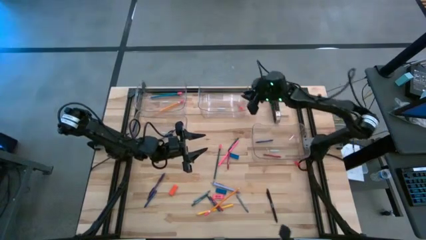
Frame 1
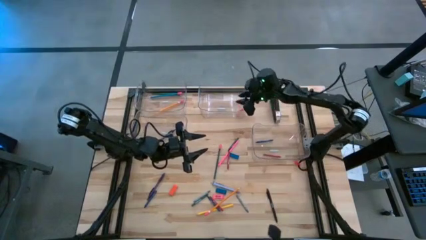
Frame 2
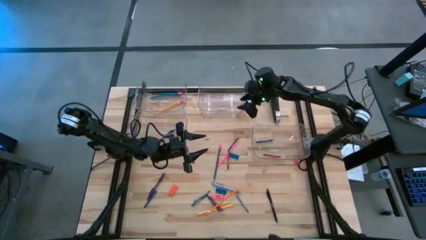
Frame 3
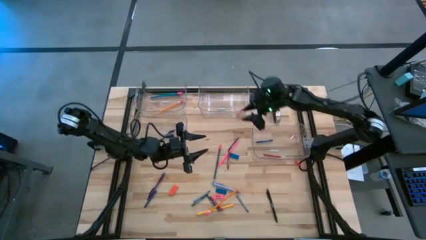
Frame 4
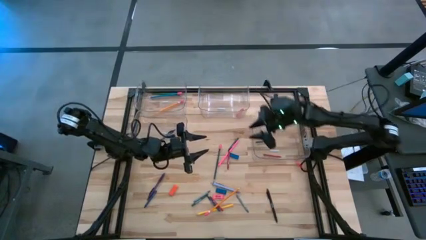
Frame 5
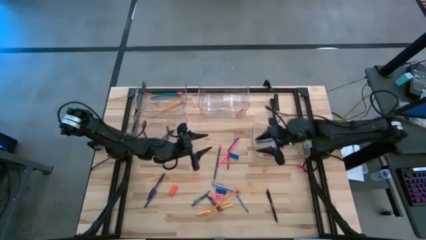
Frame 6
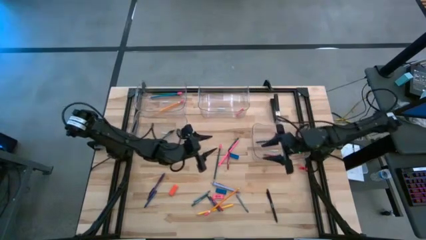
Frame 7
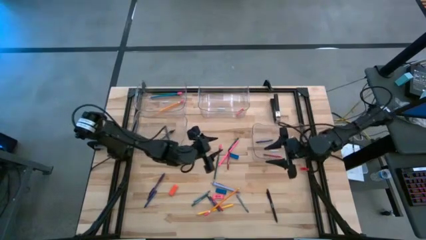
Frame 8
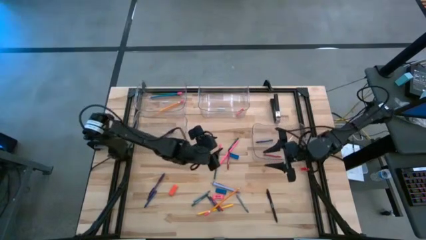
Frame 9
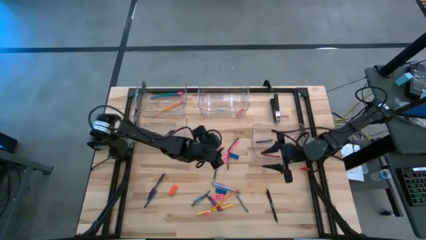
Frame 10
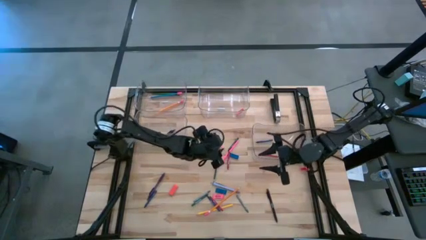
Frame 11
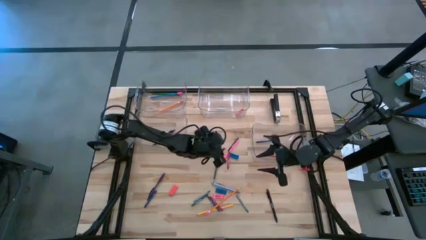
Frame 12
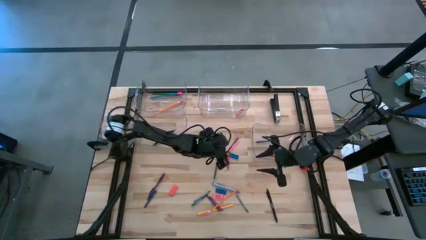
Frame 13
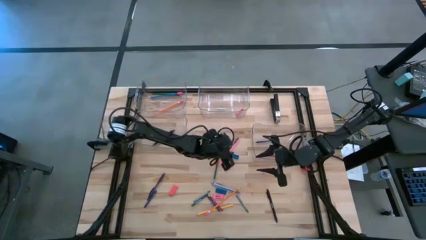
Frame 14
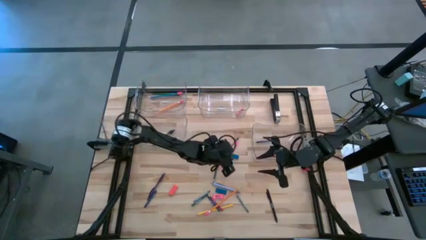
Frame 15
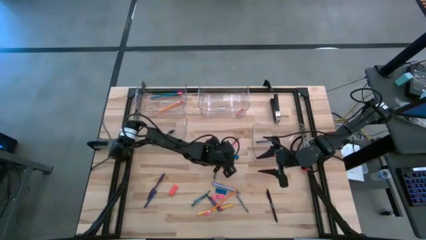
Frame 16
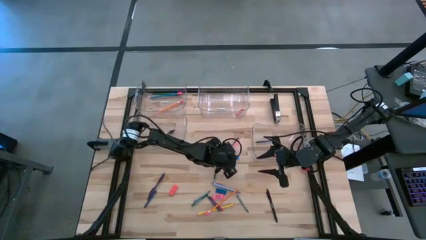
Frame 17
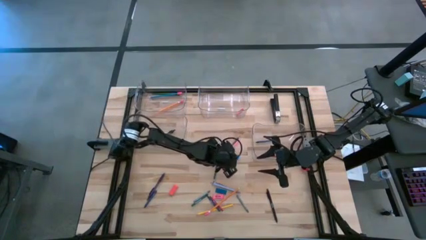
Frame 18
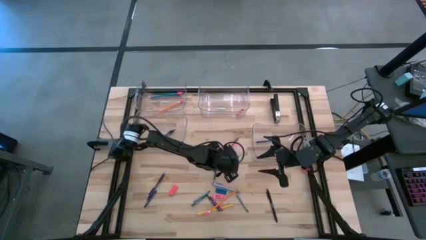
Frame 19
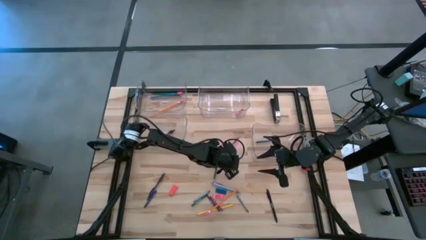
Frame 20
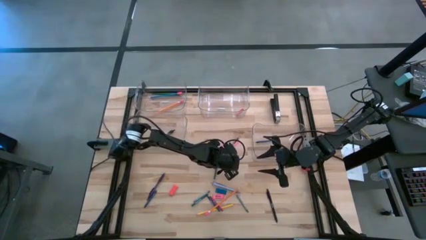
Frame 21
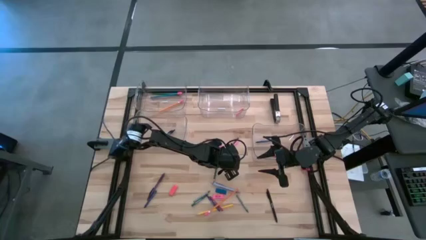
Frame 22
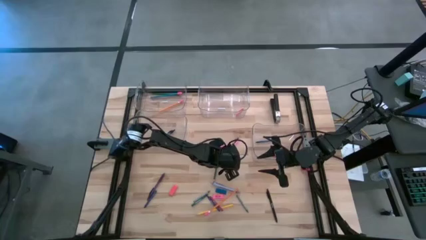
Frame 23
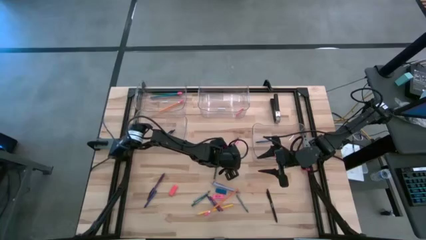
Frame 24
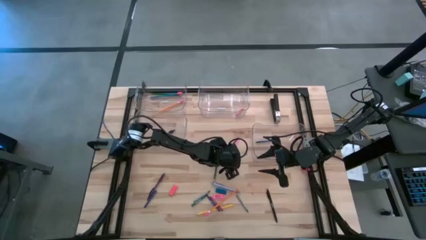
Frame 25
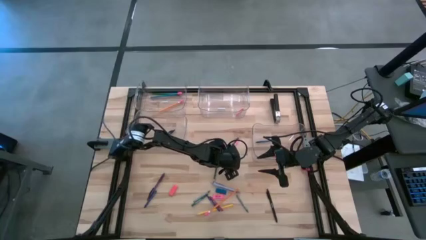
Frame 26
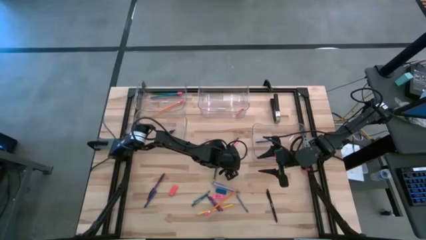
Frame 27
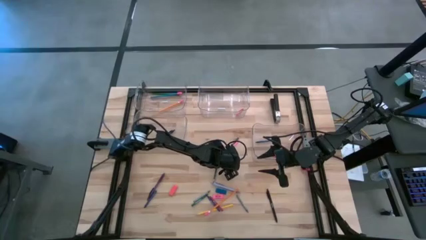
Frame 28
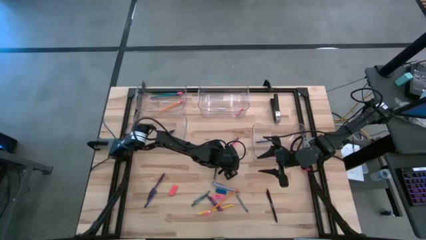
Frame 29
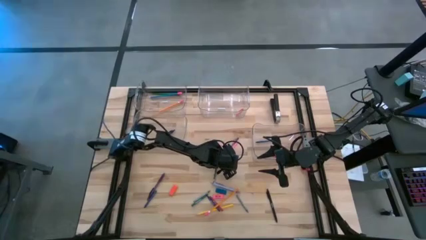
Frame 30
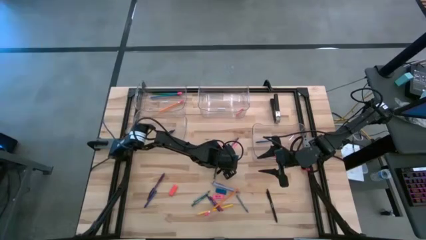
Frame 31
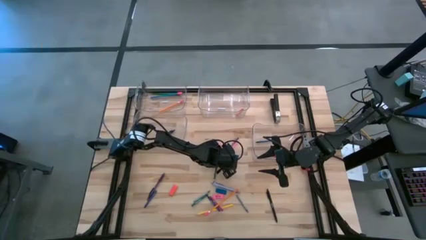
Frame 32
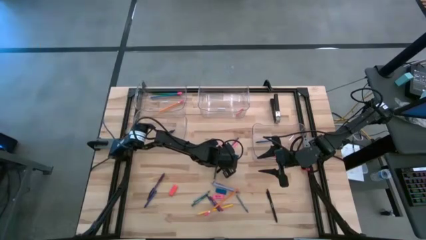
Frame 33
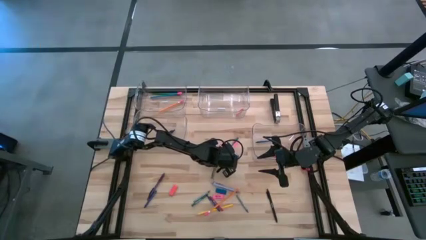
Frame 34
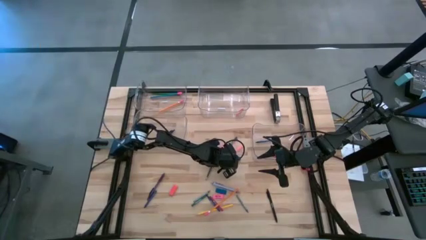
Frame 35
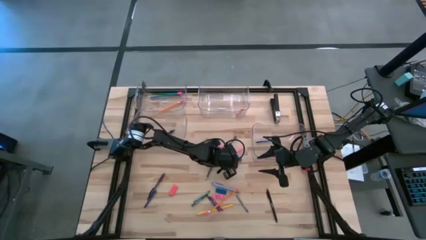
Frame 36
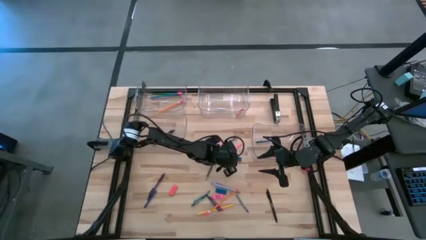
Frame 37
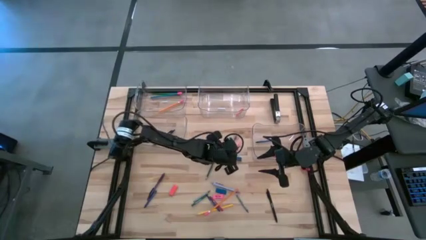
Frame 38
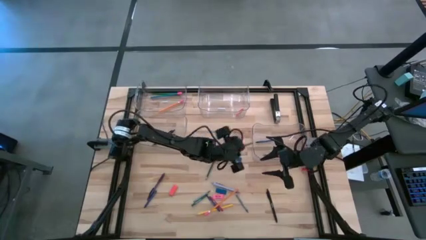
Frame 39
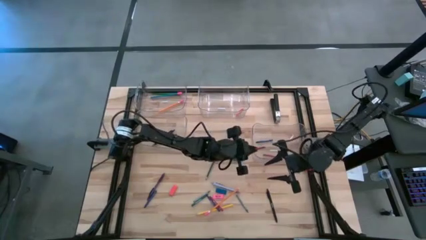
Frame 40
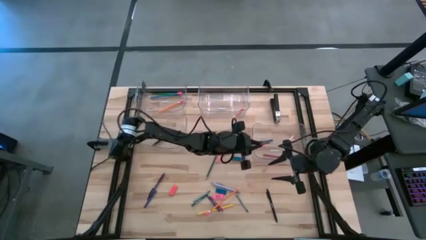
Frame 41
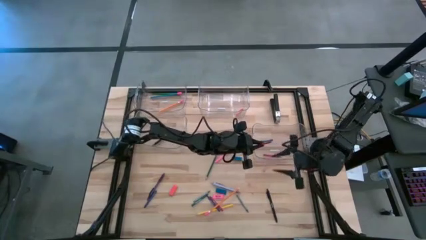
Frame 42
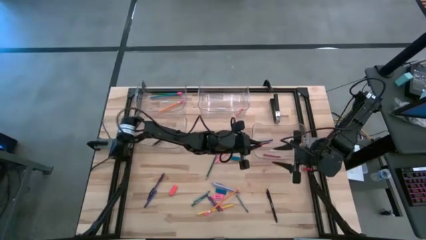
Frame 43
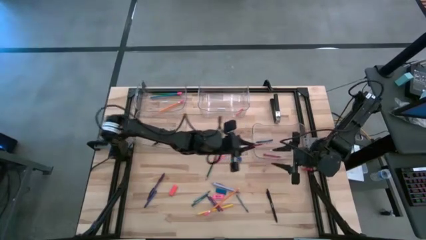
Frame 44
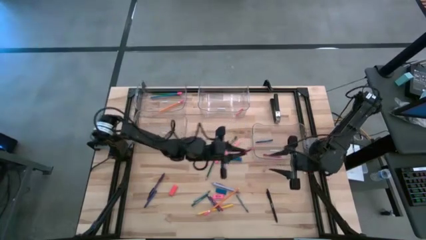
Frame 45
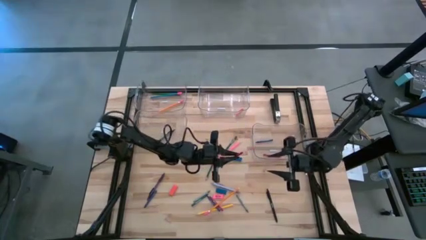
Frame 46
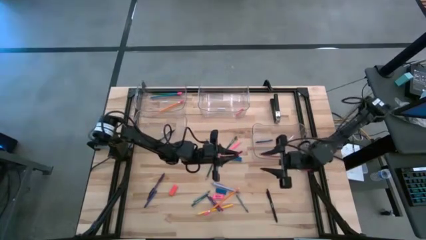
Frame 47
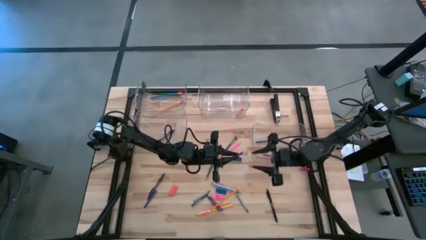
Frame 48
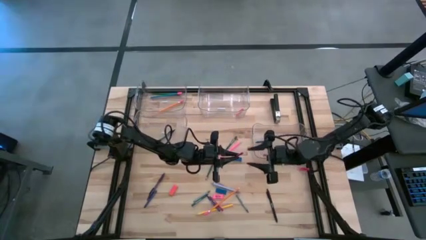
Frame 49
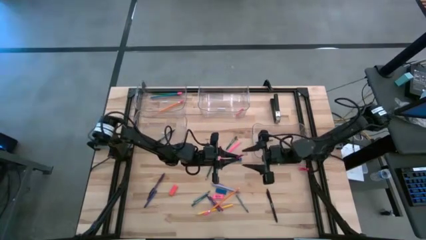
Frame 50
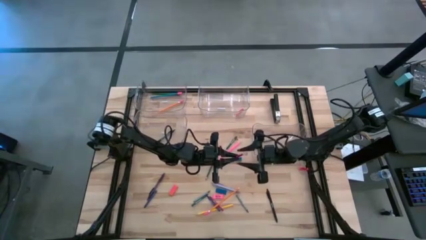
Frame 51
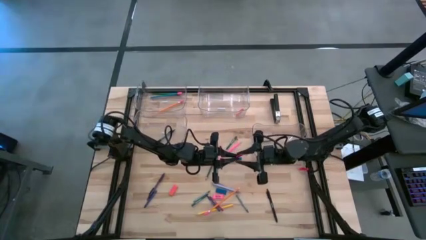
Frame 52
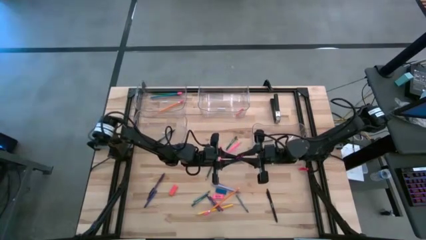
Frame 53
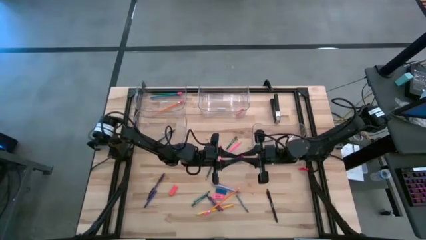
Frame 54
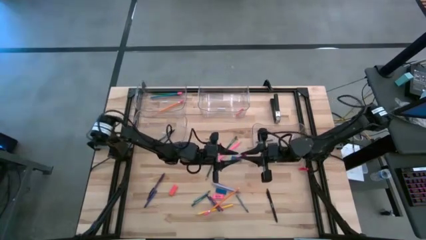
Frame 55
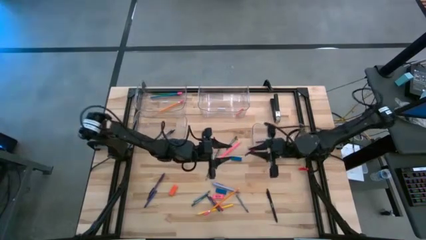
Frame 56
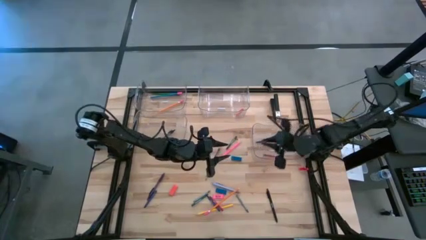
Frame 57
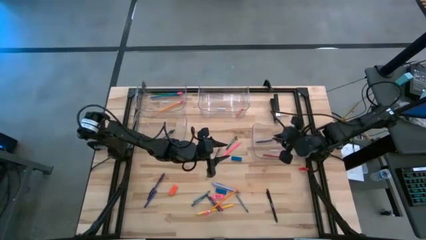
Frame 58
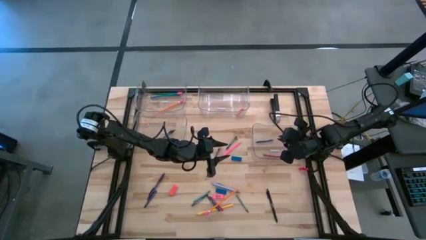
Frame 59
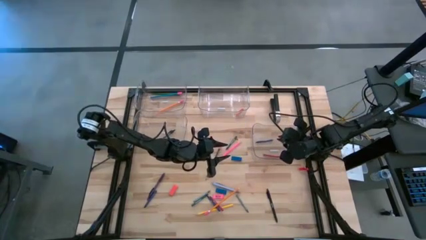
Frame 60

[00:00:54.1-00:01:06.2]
Task: Sort crayons/erasers/pens/pencils in bins
Put the red crayon into the bottom right transparent bin

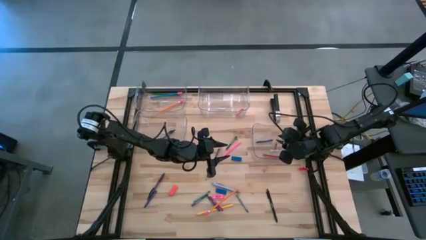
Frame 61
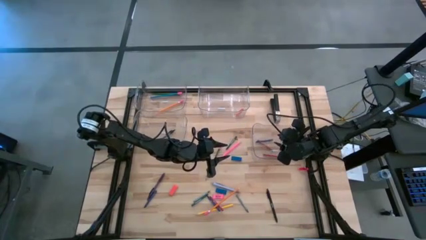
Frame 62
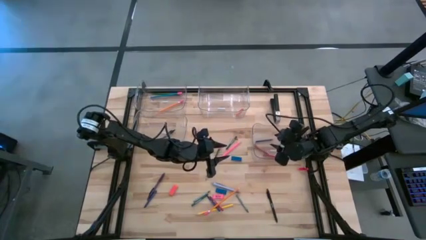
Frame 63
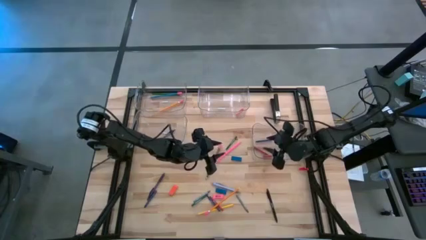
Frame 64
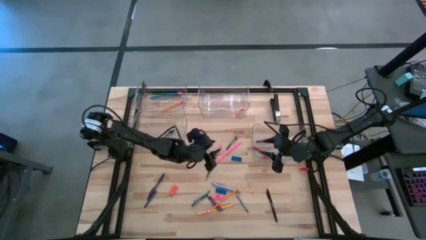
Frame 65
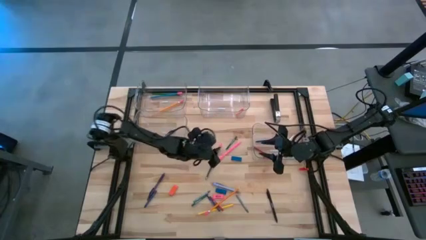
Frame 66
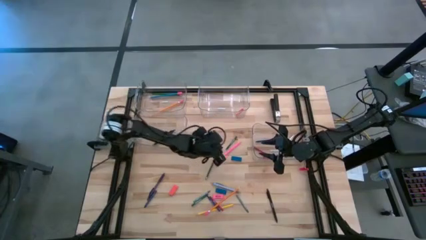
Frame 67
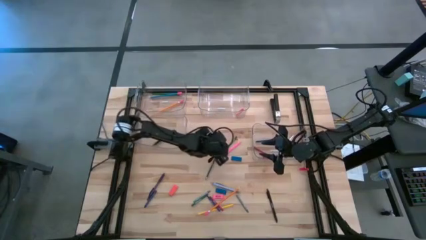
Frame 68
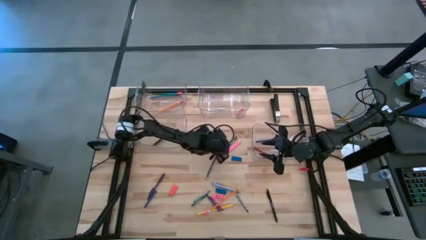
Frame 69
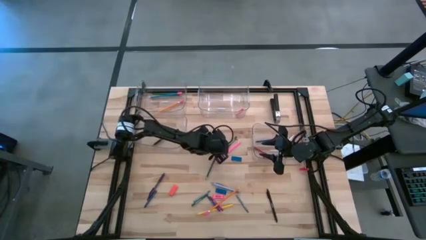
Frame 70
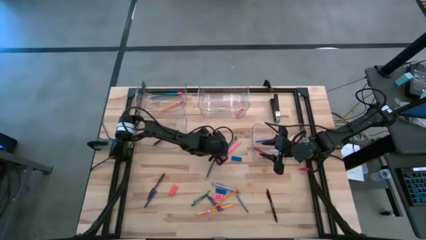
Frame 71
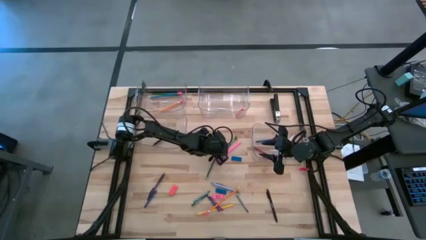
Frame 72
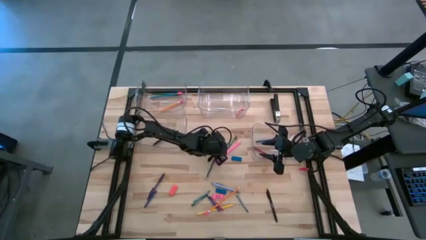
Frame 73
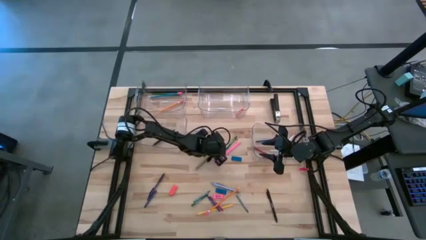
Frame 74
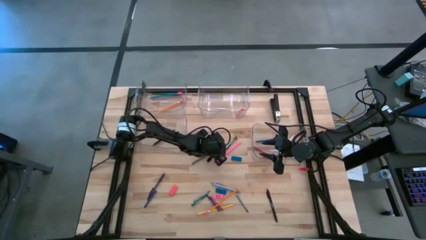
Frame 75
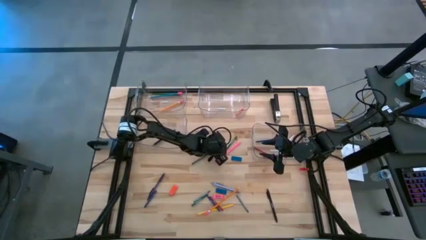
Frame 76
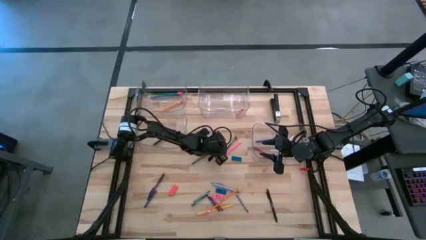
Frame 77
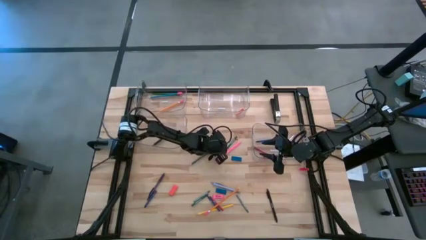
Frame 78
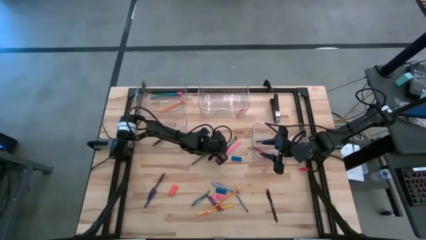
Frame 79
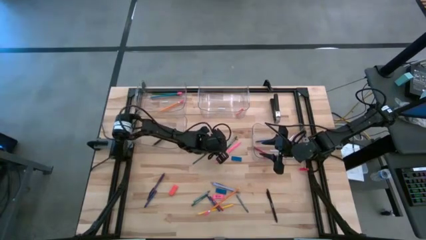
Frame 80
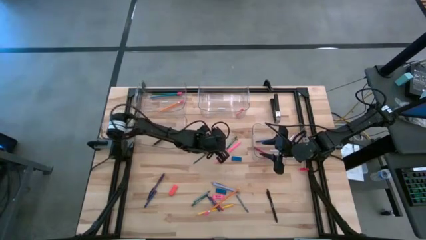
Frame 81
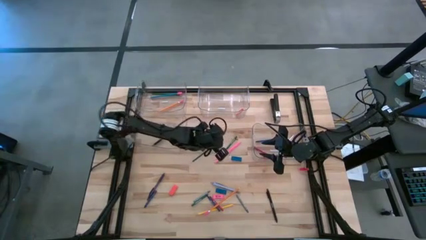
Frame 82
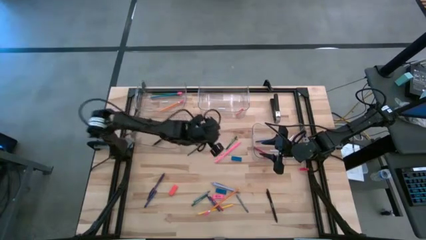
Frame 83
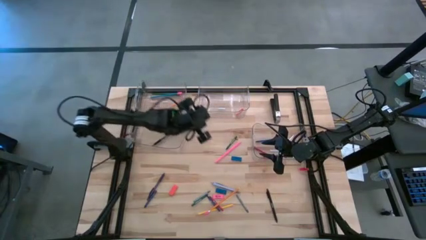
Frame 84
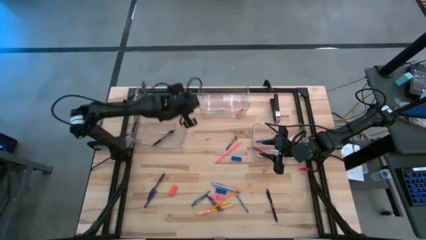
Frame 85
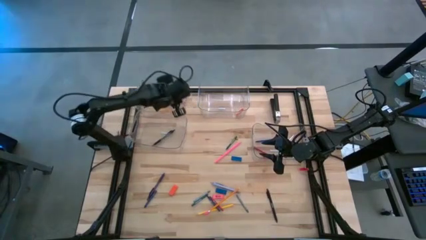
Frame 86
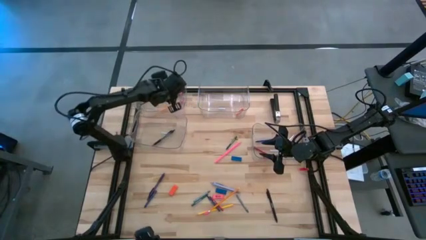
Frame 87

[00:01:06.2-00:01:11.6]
Put the green pencil into the top left transparent bin
